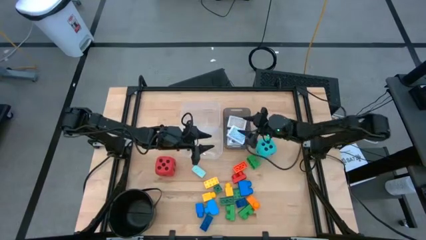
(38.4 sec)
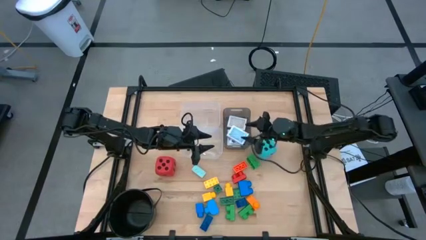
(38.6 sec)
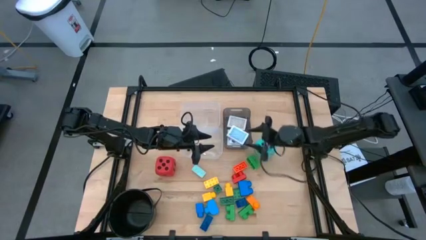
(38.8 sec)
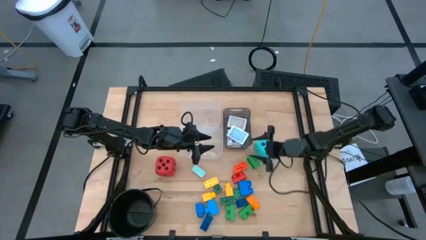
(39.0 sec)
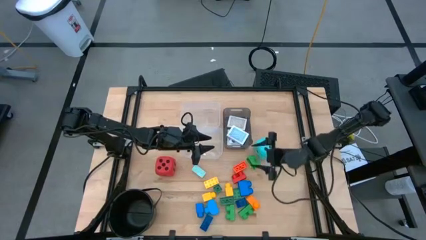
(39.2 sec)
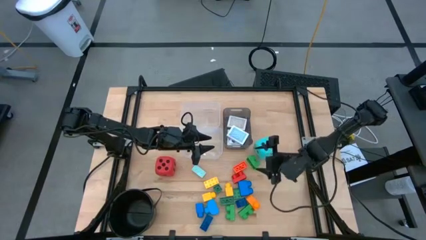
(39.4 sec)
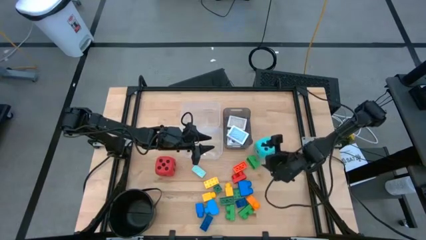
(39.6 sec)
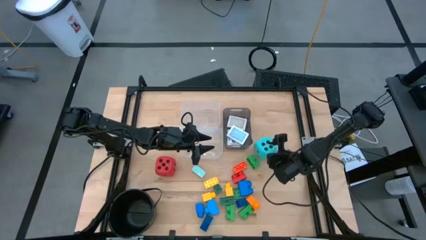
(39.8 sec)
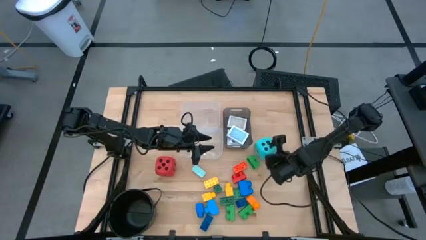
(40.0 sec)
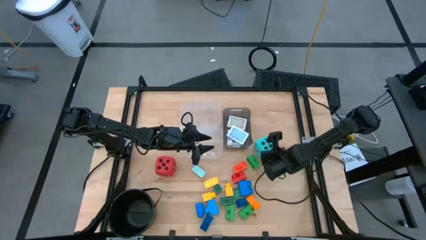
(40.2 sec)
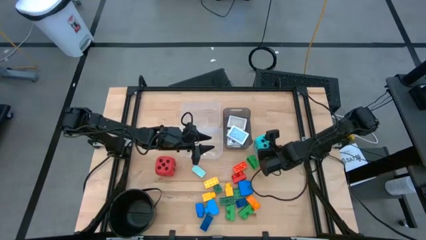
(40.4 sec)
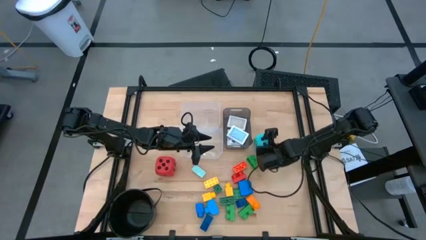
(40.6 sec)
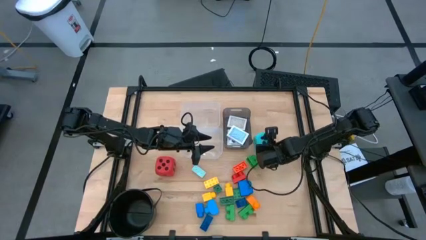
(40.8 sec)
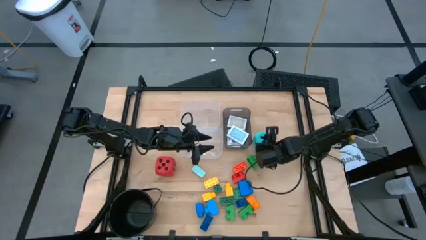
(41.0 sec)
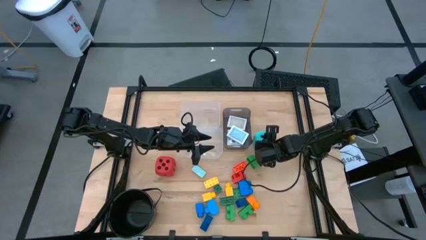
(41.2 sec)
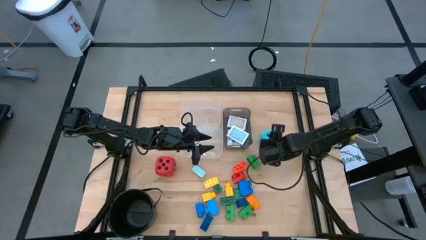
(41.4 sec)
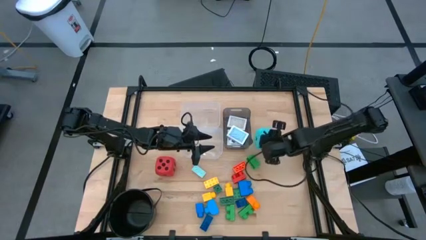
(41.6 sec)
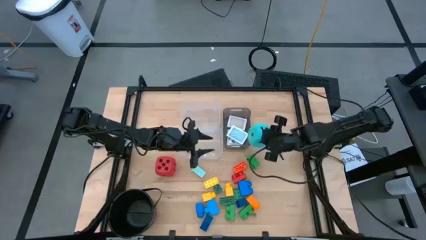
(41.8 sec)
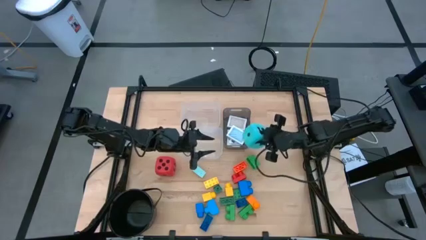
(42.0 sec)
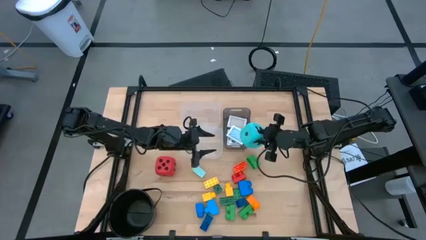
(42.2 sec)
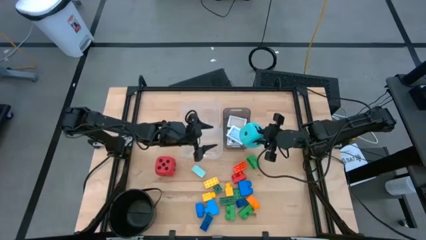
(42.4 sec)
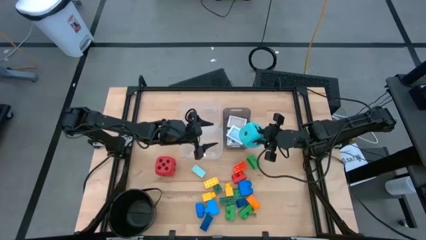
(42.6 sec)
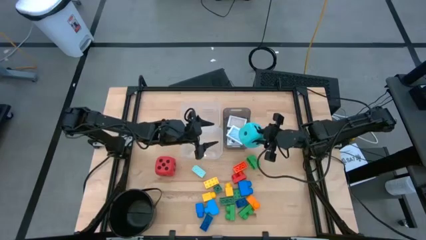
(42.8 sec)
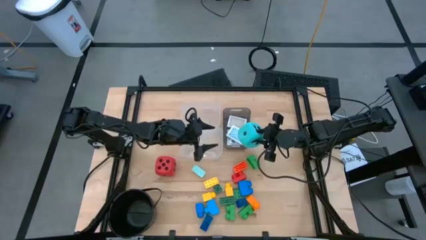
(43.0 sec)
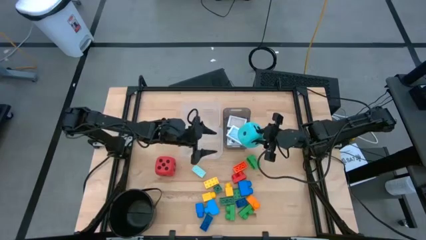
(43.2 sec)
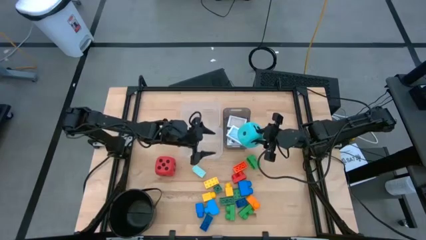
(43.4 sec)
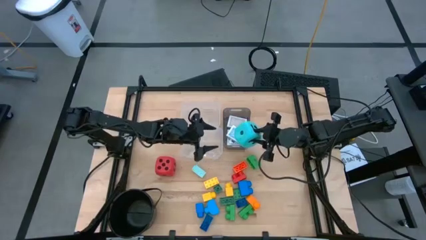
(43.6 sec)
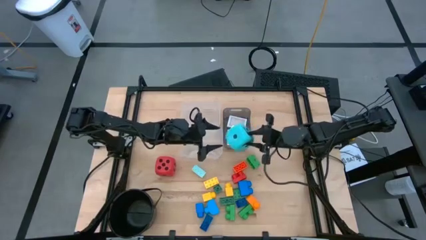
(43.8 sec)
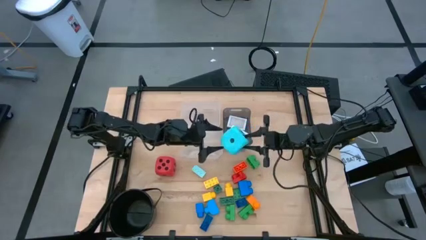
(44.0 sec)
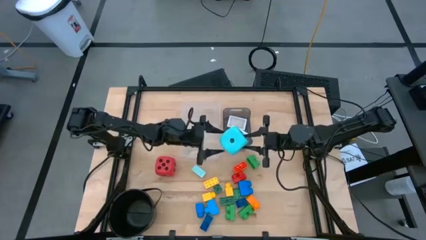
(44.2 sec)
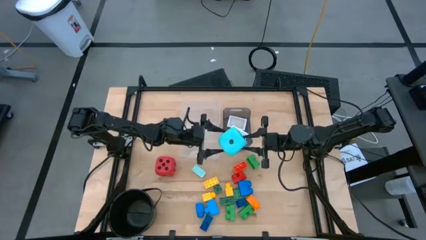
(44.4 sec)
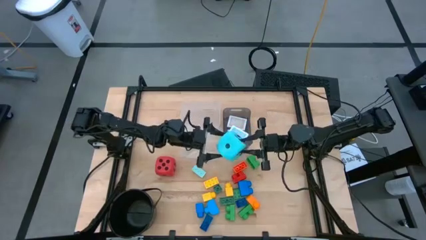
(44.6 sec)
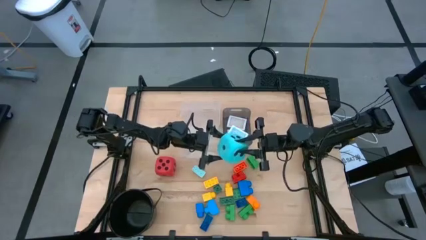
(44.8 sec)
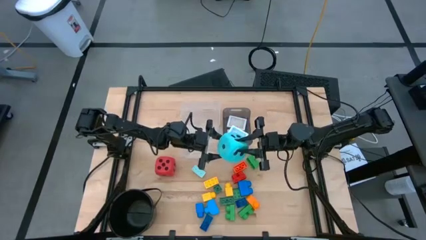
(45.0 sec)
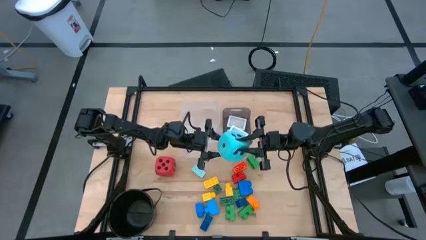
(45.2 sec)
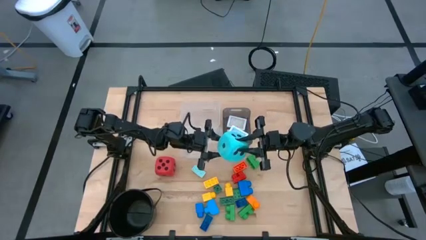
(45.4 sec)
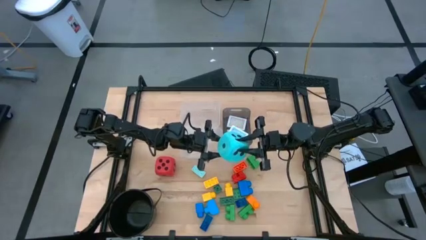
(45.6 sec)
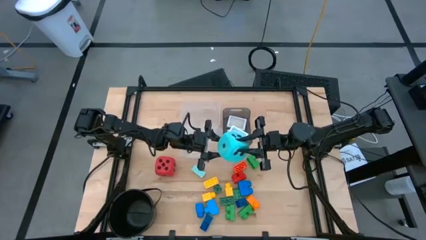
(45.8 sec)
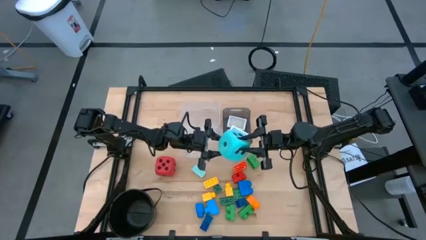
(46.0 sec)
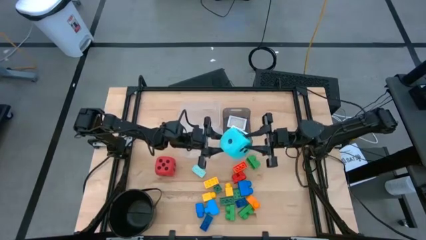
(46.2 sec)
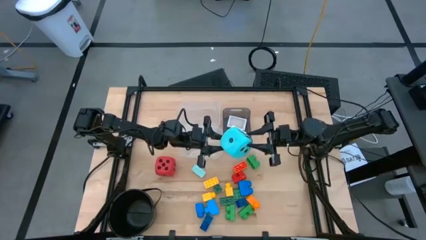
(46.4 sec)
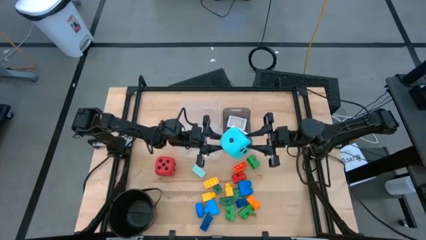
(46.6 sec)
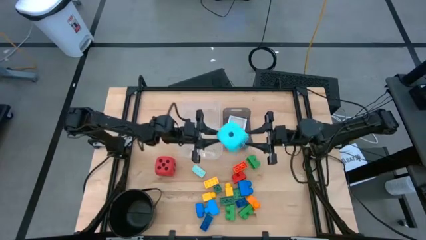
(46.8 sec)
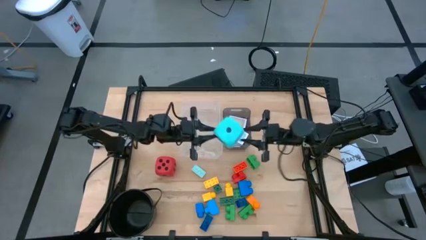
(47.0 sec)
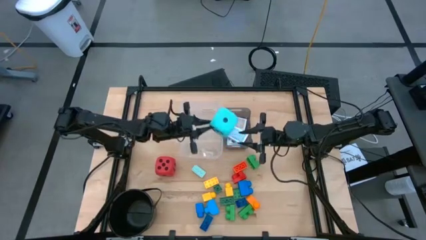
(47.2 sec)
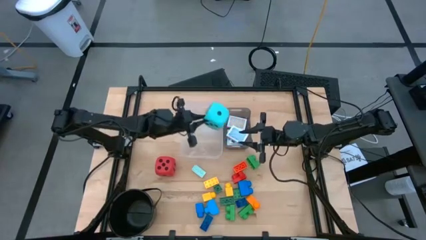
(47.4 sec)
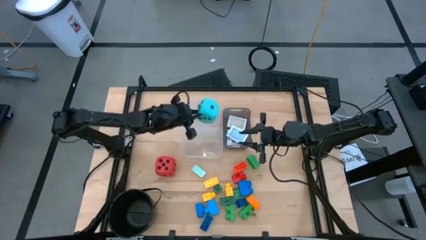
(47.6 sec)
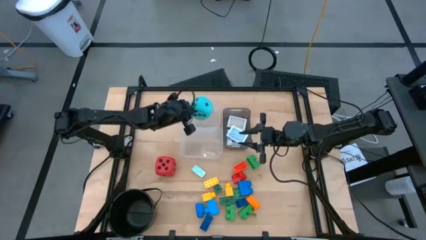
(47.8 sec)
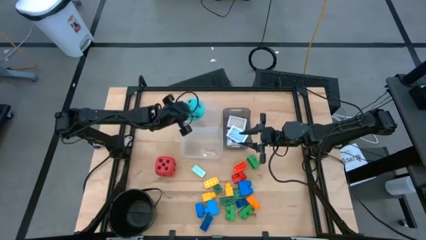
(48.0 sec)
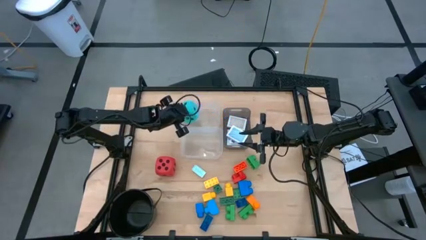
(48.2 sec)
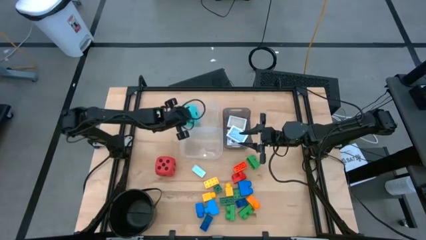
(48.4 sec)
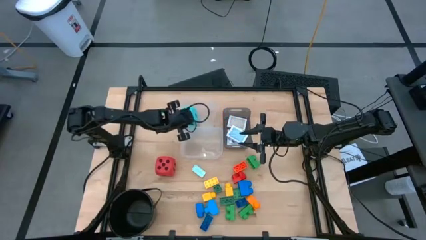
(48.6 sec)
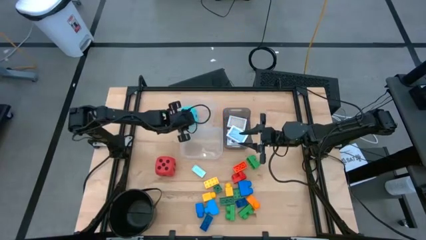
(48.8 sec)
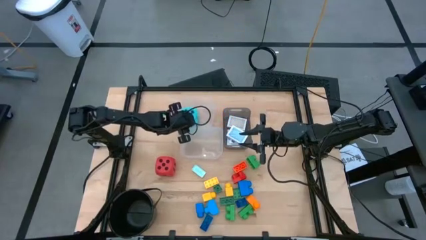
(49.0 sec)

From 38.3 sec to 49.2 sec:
Task: Pick & Place Toys
Put the blue dice into the top transparent bin

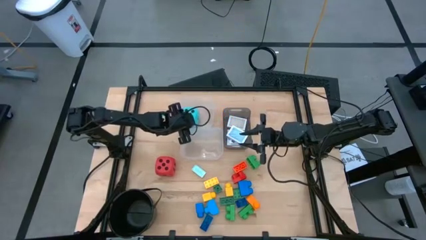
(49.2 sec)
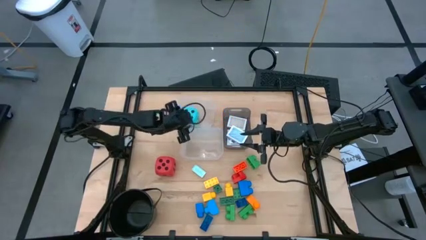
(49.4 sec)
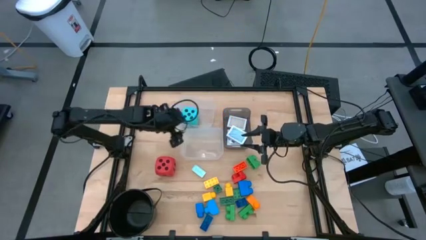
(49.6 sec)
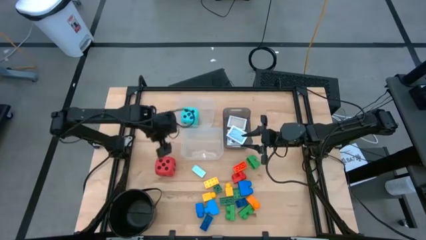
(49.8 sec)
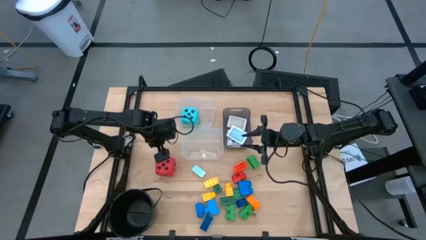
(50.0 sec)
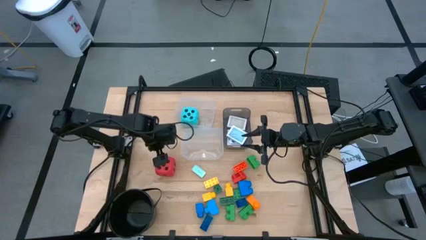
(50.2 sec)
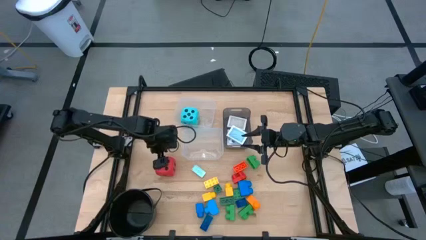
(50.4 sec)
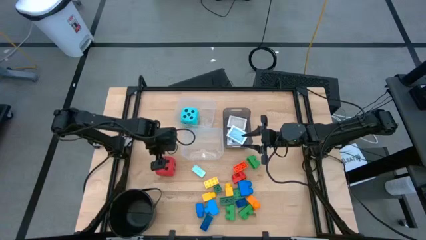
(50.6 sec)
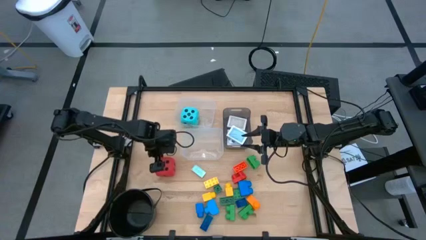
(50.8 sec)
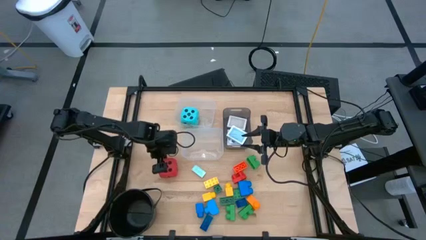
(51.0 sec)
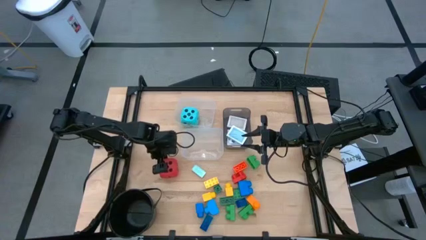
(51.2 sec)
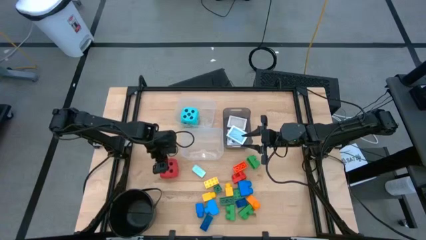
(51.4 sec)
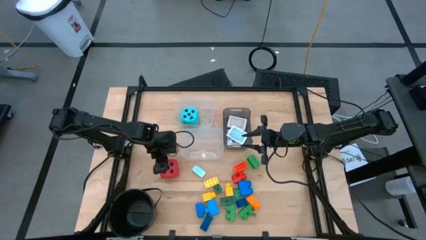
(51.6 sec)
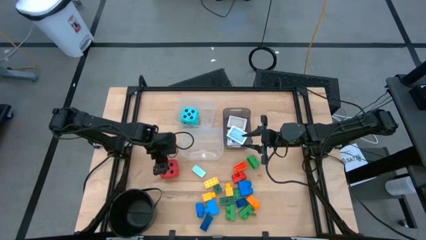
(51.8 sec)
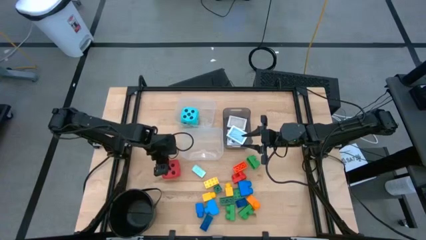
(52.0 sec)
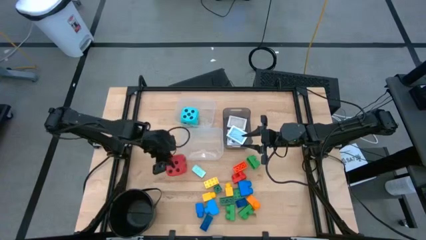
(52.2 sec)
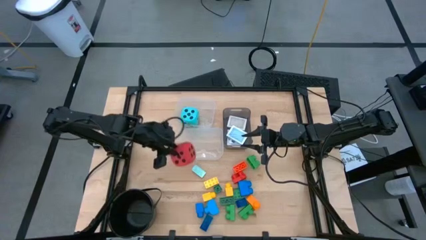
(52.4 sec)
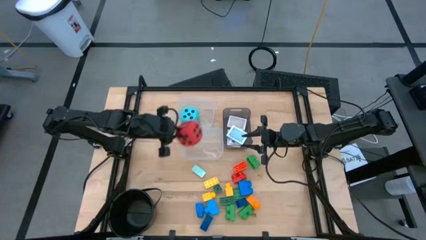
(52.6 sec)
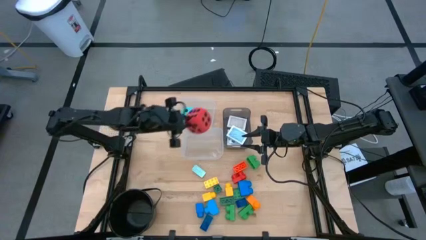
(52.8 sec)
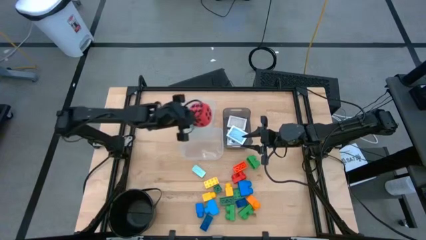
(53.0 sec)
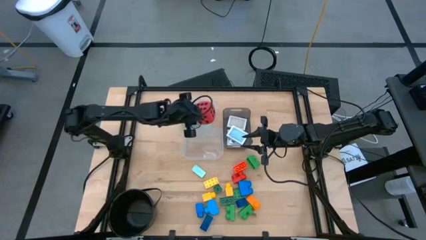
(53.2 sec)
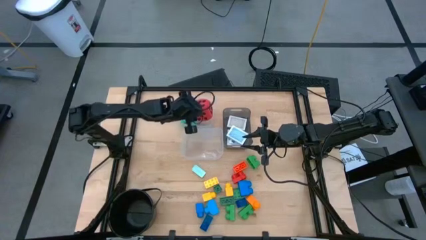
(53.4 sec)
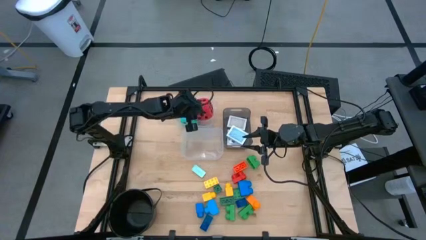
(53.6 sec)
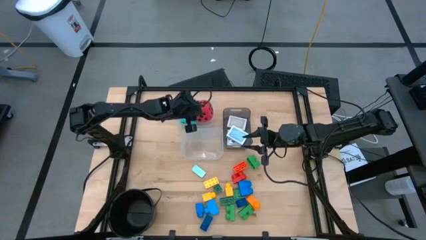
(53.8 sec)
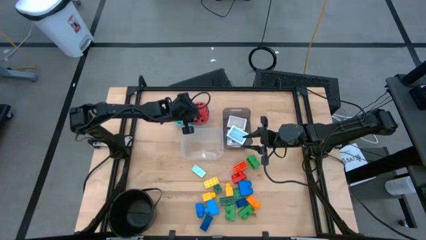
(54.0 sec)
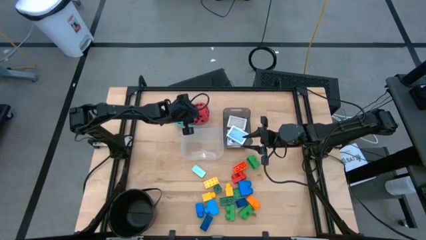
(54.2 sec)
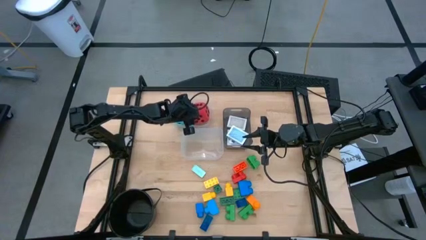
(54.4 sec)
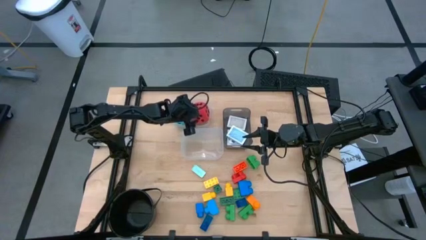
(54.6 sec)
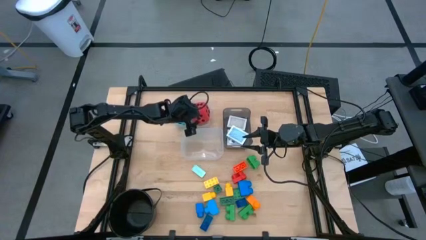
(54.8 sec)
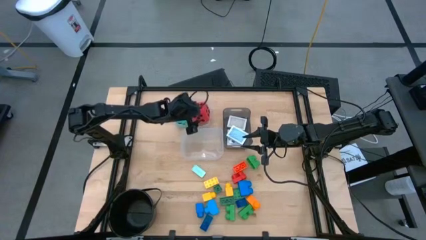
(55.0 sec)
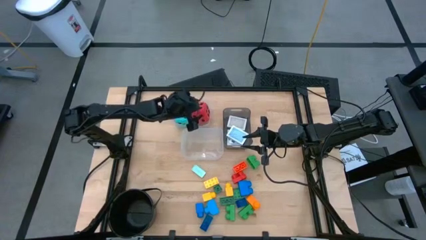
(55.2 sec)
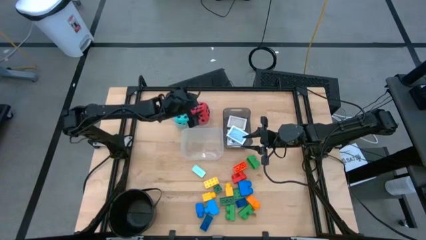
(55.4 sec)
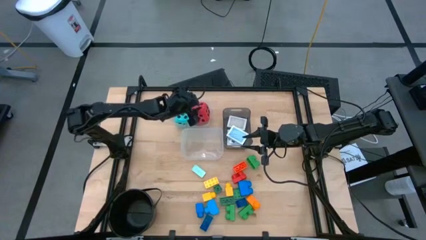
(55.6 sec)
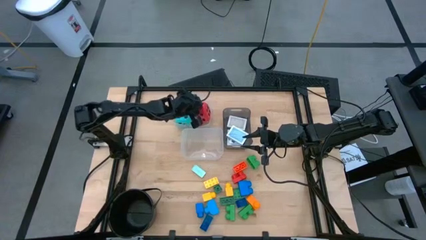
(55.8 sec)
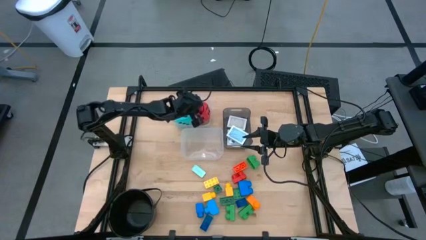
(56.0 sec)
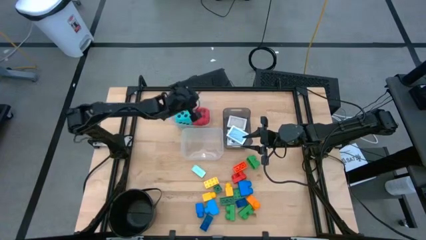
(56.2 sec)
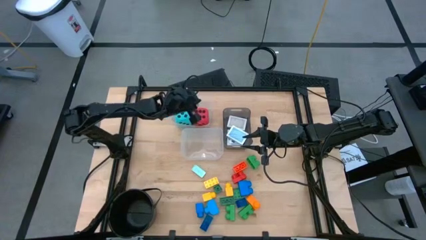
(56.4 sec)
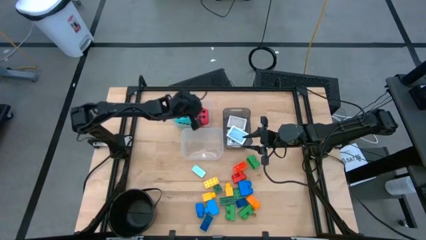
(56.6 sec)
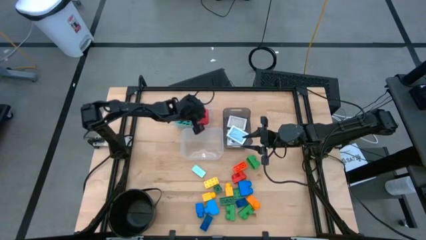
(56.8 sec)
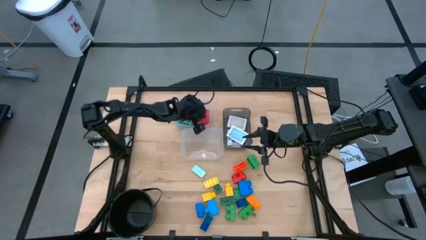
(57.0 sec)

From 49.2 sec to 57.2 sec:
Put the red dice into the top transparent bin
